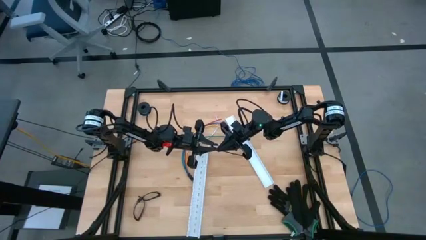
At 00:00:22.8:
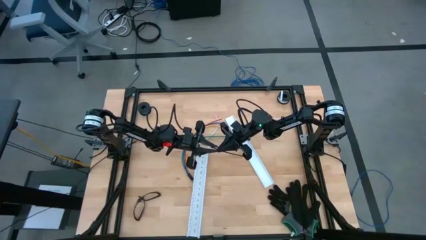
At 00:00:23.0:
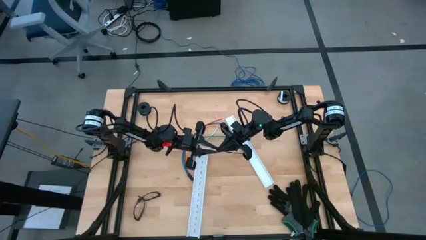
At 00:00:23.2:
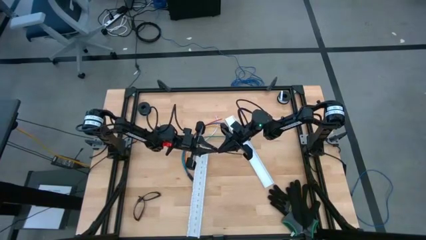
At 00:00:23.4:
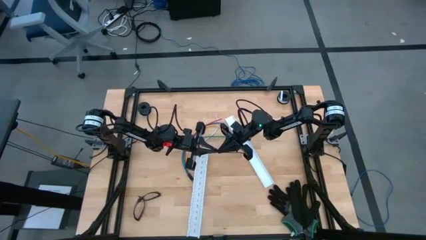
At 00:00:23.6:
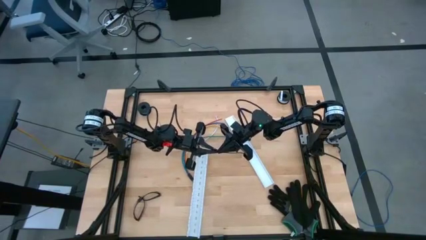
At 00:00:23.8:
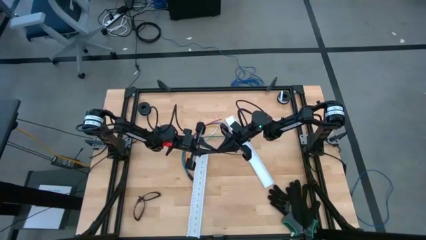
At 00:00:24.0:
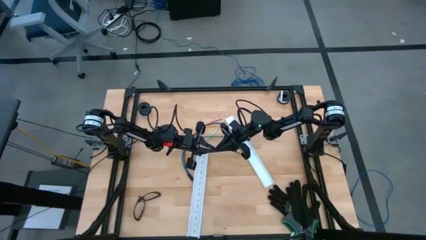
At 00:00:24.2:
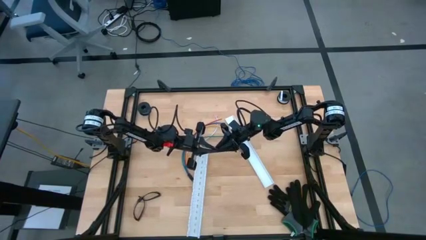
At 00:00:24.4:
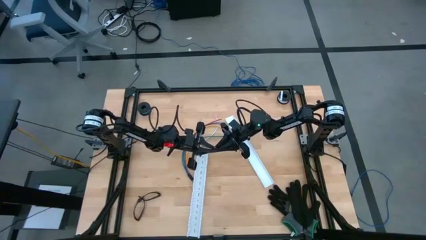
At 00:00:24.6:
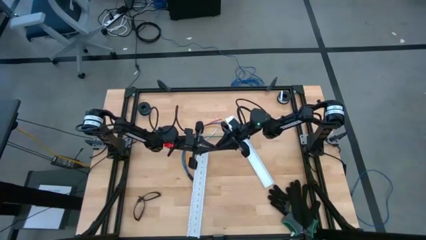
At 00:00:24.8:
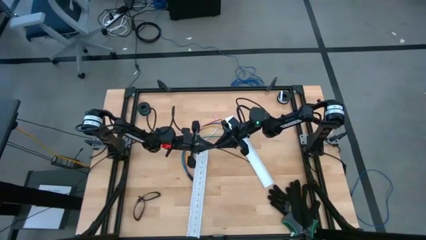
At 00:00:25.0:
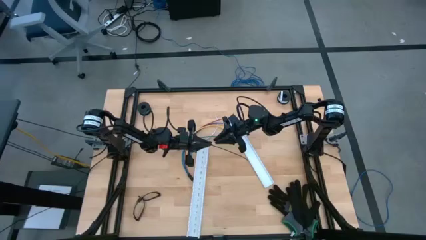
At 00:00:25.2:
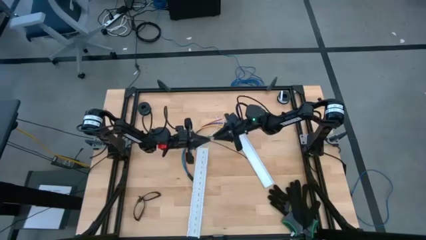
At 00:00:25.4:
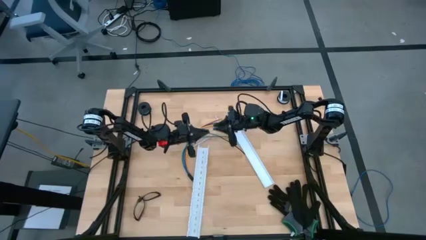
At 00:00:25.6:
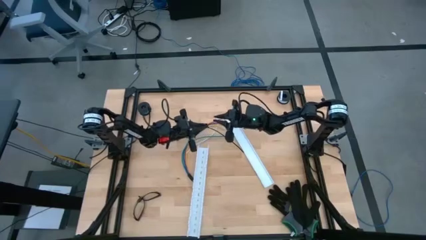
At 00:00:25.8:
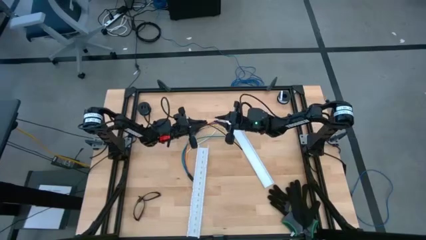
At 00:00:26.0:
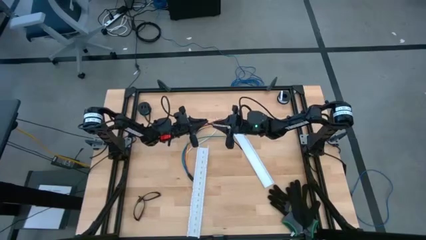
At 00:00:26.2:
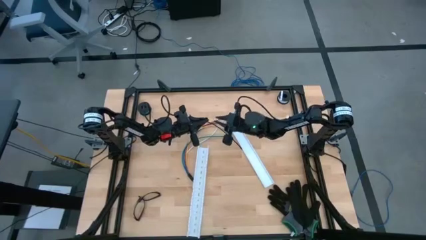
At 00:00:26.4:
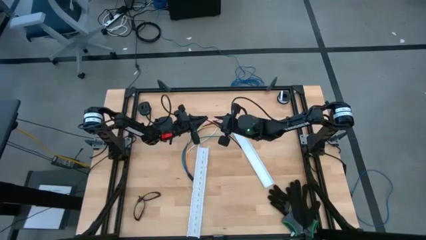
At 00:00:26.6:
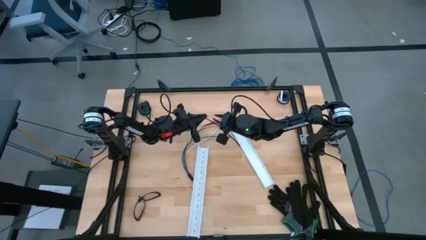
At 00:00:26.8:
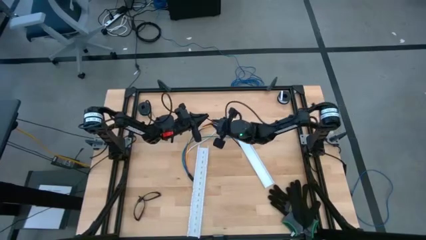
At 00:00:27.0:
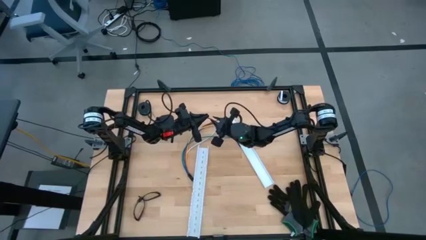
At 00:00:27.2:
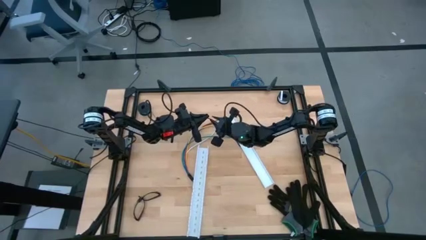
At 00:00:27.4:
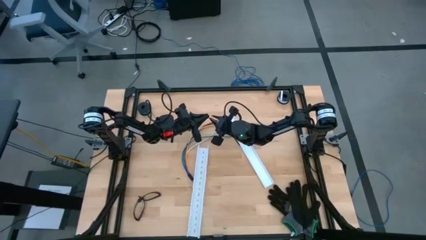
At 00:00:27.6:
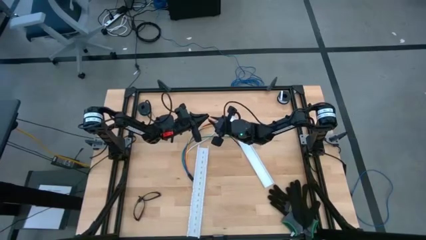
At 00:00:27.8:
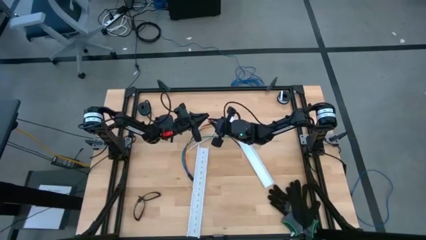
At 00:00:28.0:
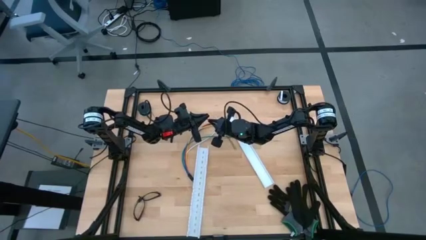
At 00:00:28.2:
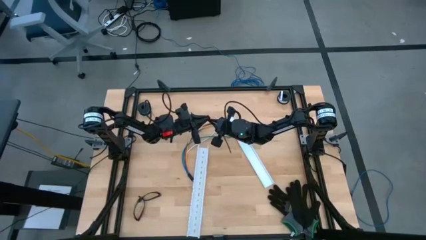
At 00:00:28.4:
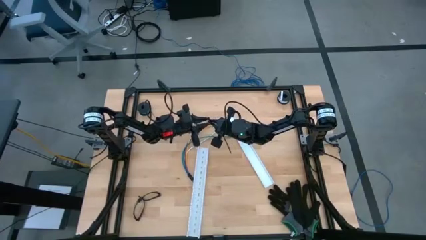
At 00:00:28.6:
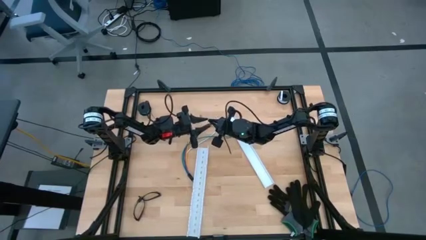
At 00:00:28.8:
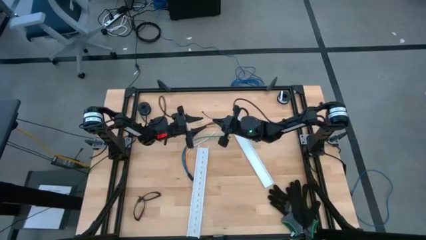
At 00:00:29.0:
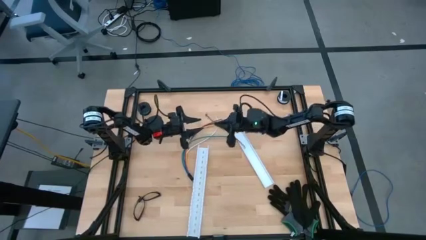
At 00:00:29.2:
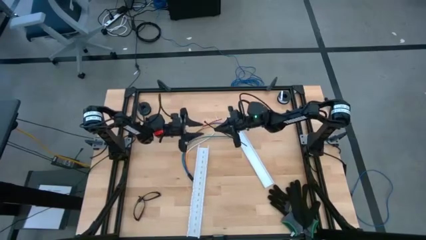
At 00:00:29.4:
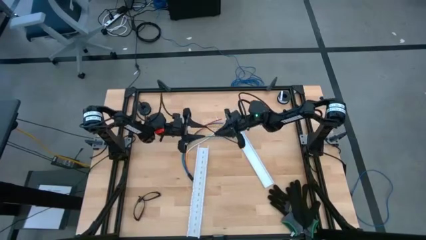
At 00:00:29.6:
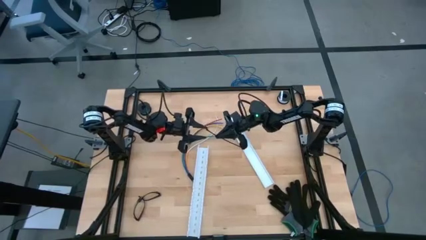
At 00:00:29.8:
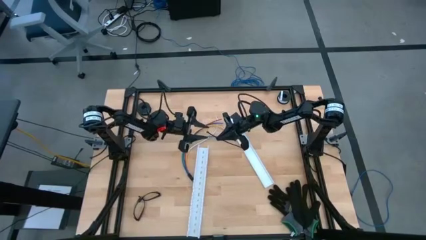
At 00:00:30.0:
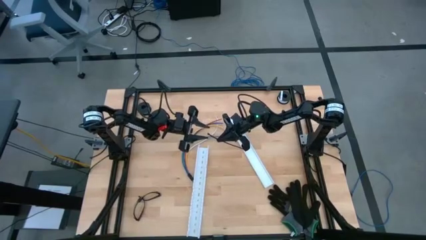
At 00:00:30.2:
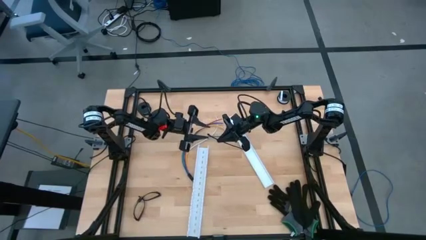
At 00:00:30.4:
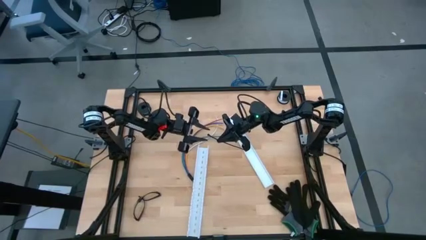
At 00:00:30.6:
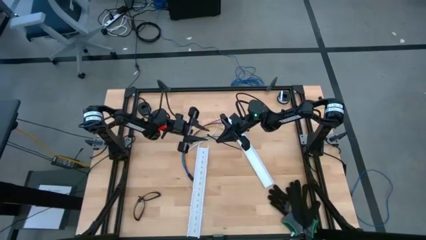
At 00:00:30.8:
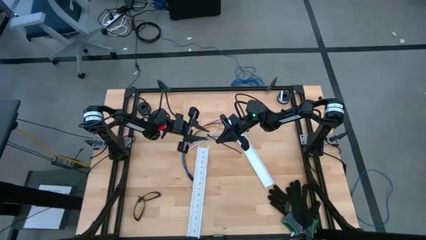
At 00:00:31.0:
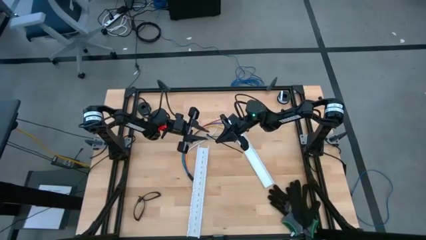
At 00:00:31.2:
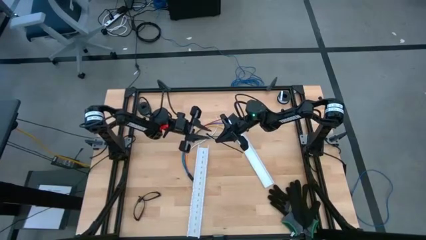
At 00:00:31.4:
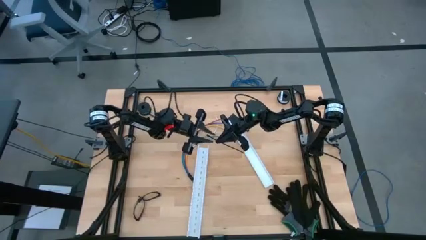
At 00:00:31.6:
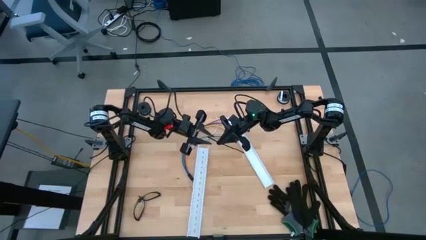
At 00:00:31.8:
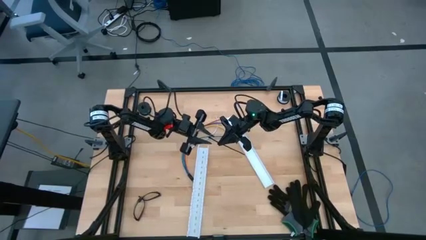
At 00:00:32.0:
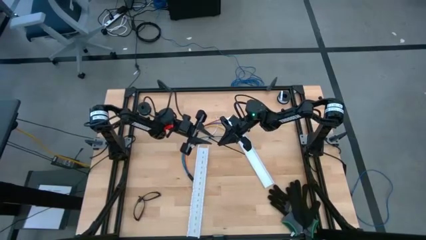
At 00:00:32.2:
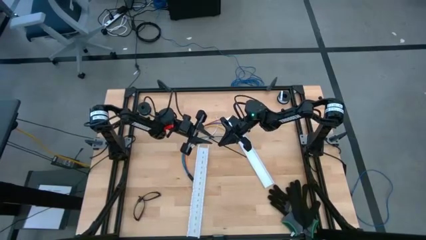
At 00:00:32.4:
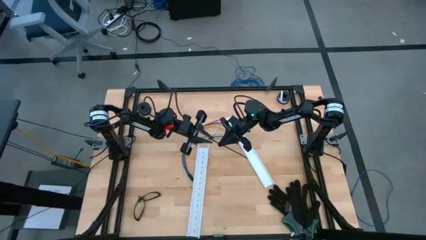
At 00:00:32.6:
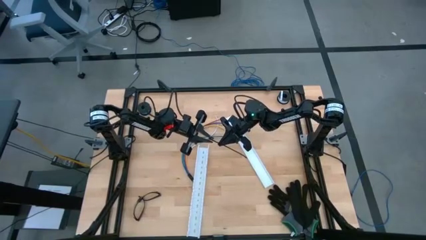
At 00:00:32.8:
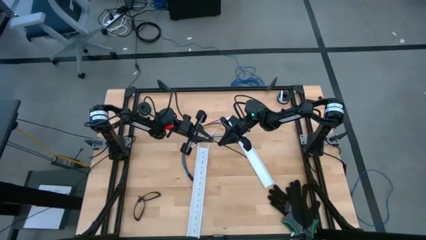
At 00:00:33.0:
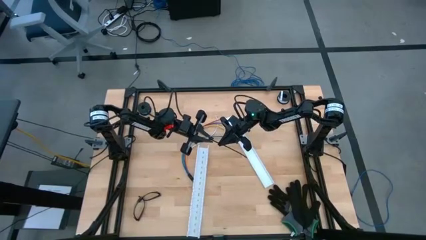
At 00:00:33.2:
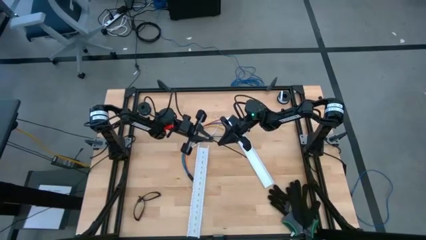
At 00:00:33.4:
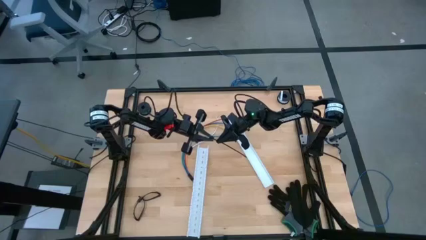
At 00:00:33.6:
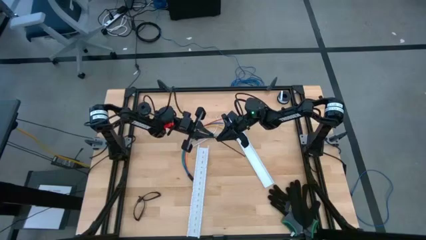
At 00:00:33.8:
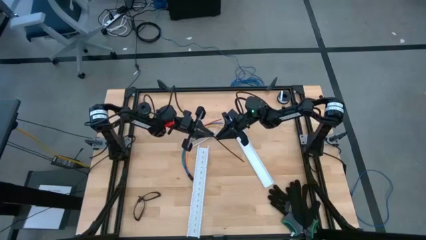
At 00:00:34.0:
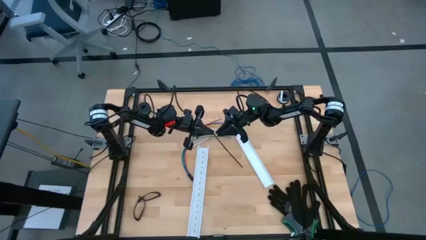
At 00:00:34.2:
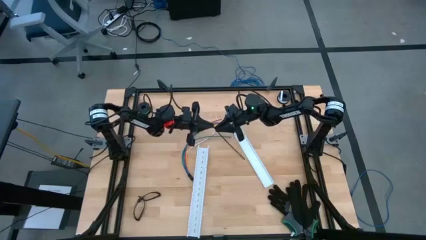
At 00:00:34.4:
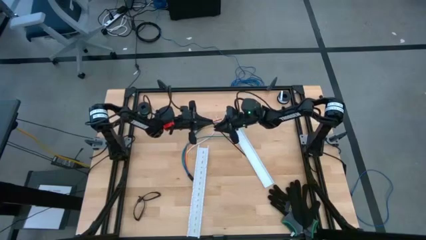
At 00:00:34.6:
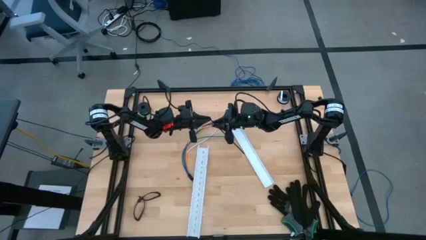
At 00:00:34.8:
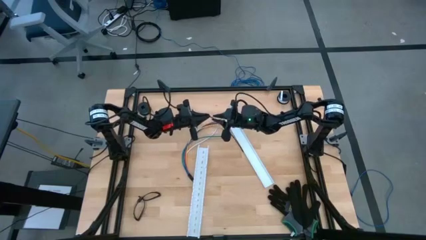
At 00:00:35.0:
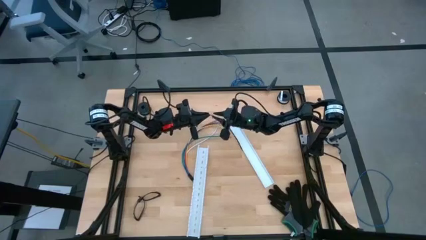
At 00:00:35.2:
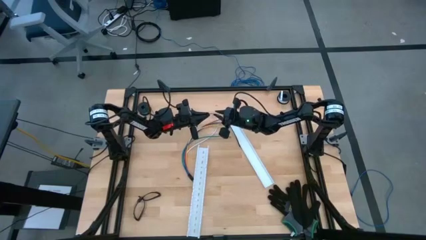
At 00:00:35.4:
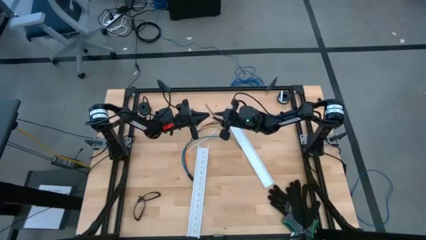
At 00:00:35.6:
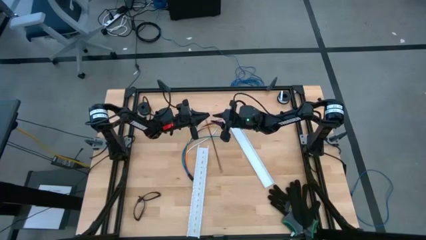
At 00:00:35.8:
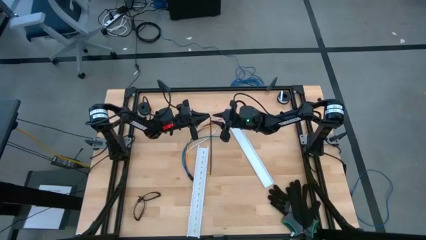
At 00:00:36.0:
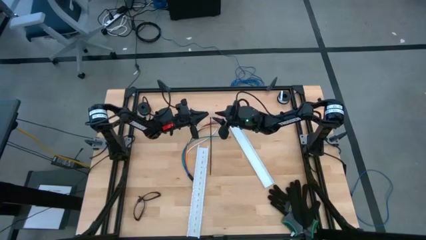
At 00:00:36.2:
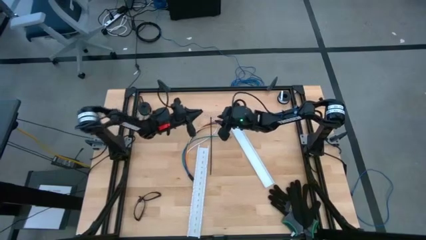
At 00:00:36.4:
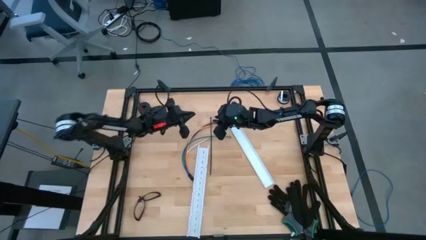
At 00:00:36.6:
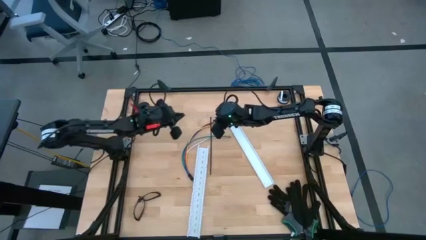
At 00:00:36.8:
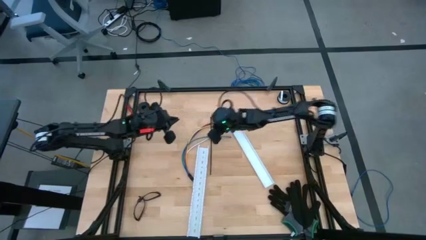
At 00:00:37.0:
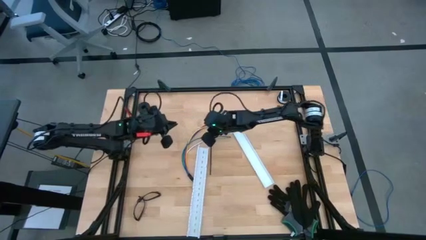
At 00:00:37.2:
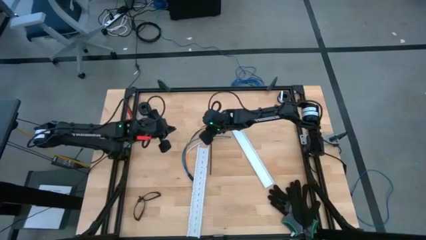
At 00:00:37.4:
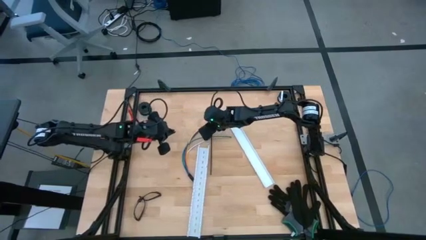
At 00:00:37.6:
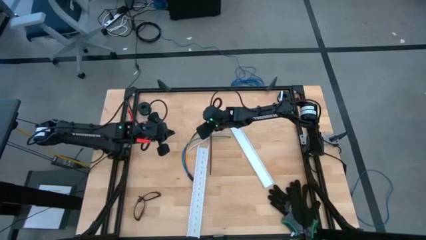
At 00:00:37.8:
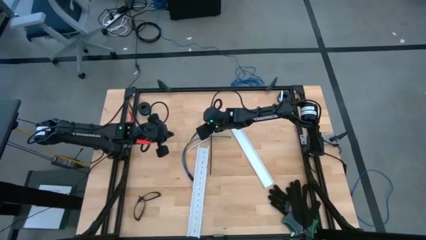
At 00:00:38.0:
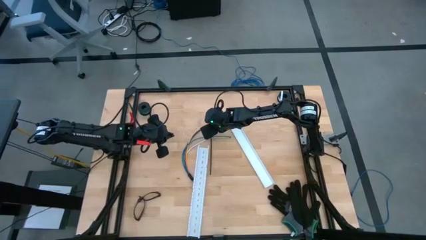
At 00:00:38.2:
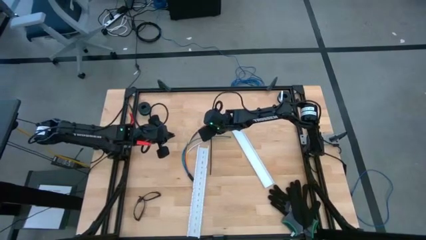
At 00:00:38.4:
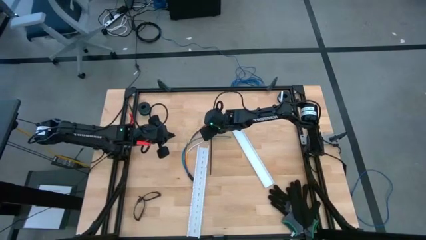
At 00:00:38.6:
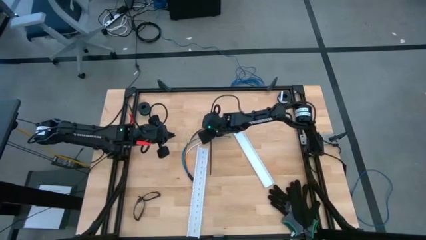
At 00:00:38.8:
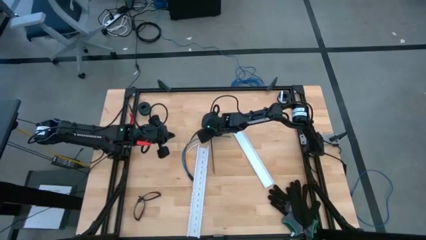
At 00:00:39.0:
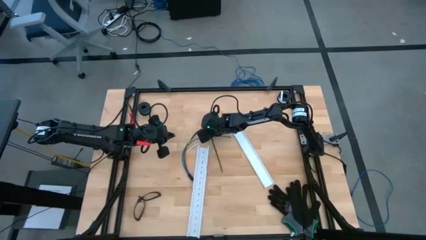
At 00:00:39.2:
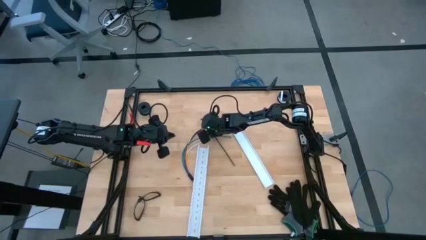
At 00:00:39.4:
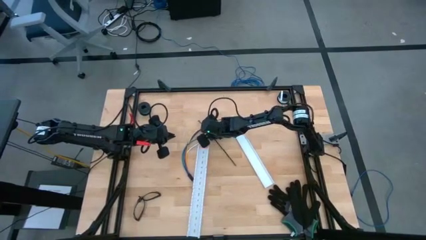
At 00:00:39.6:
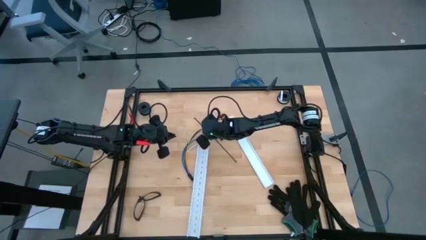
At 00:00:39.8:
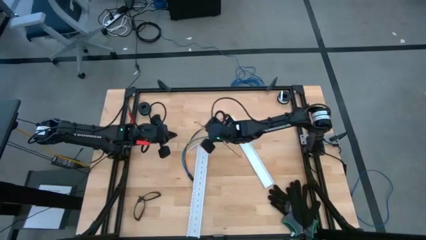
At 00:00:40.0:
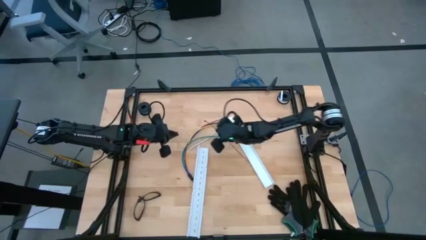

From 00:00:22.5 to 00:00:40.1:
Task: Ziptie cables
Wrap the black zip tie around the object
